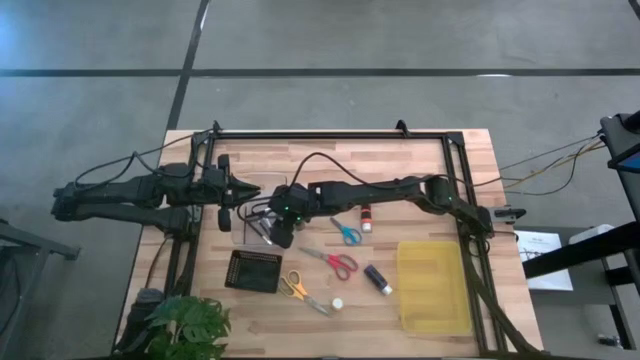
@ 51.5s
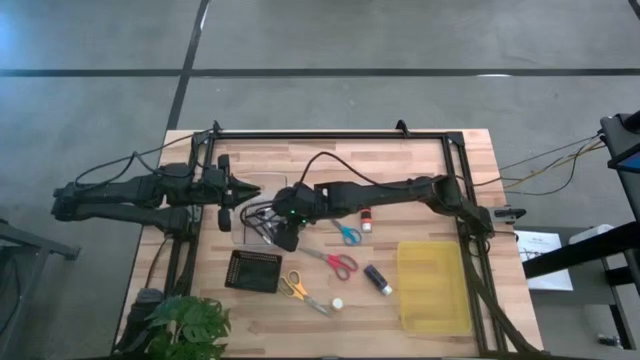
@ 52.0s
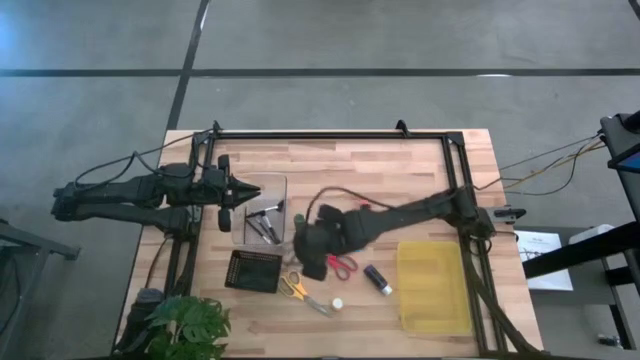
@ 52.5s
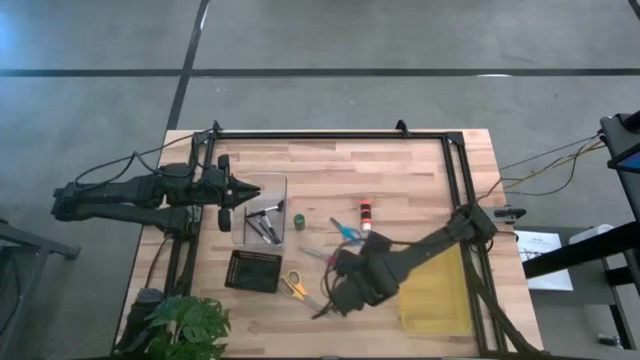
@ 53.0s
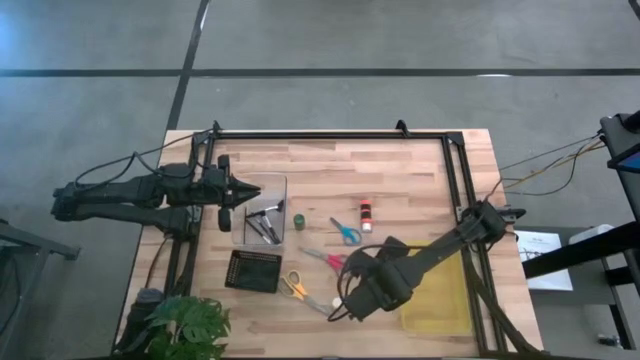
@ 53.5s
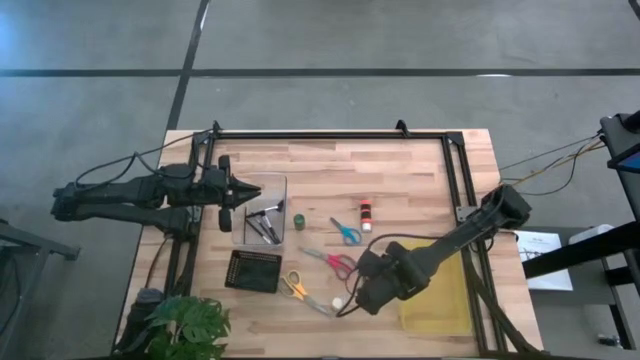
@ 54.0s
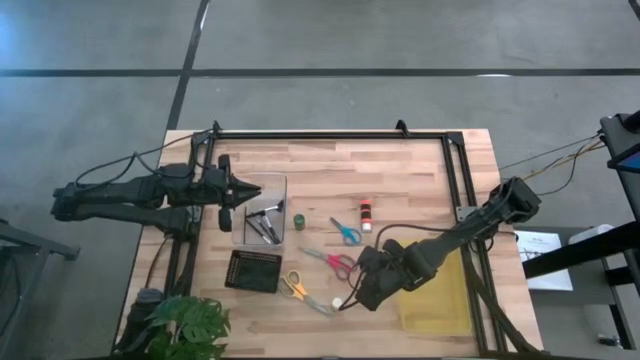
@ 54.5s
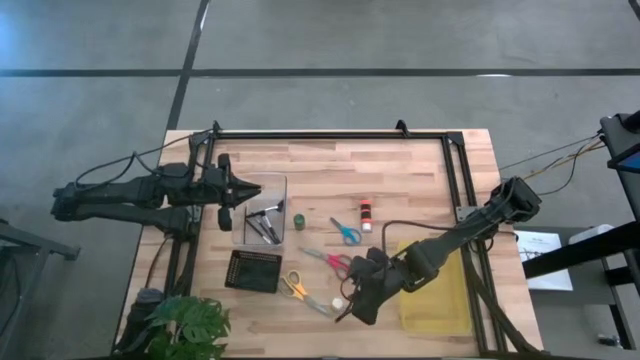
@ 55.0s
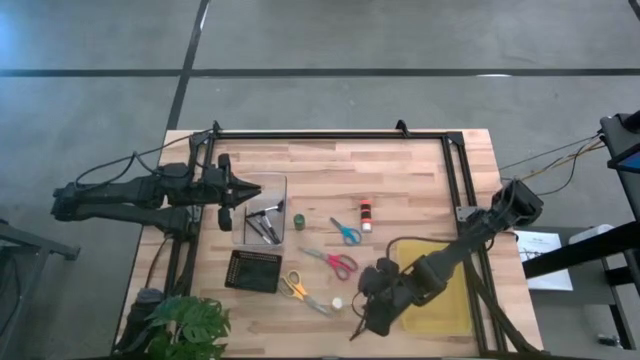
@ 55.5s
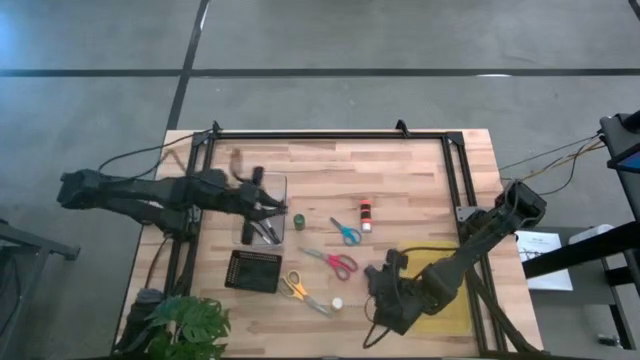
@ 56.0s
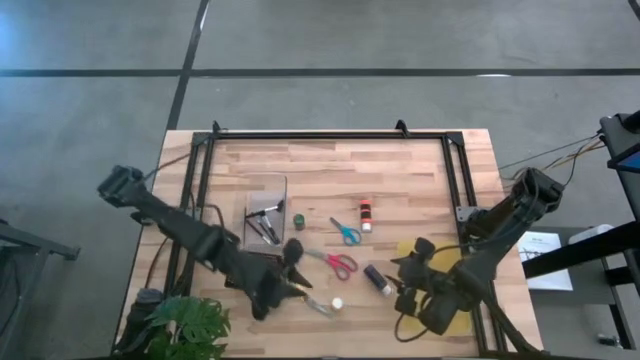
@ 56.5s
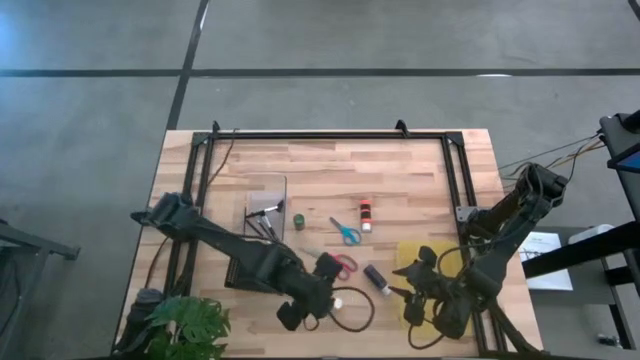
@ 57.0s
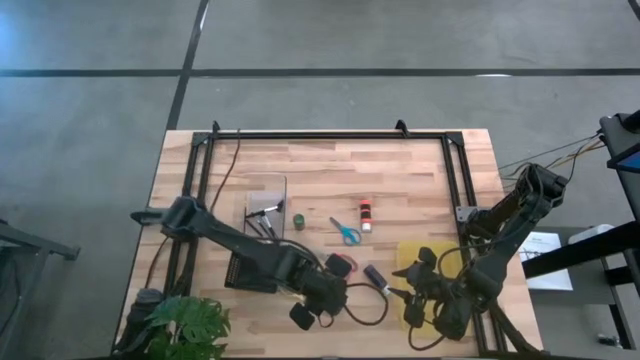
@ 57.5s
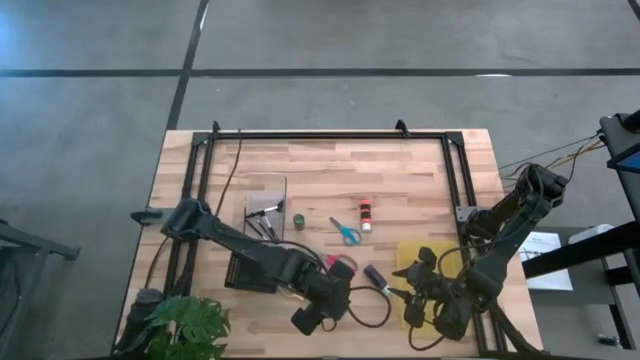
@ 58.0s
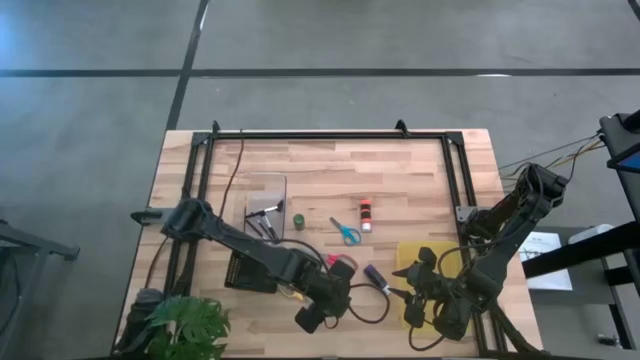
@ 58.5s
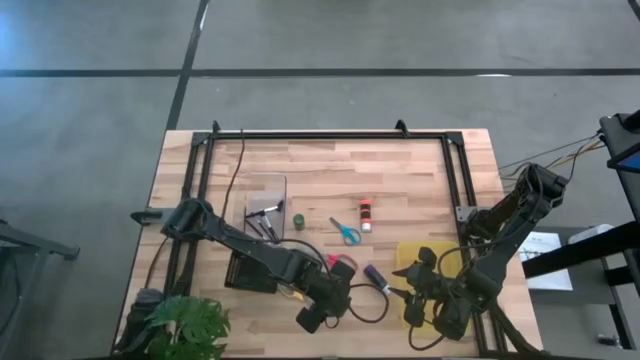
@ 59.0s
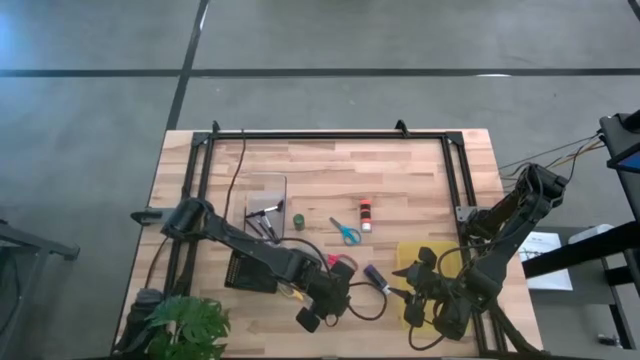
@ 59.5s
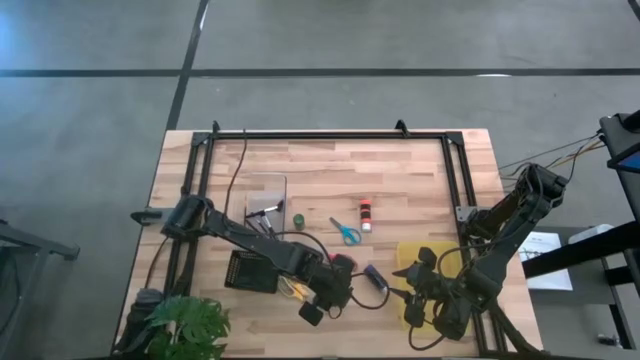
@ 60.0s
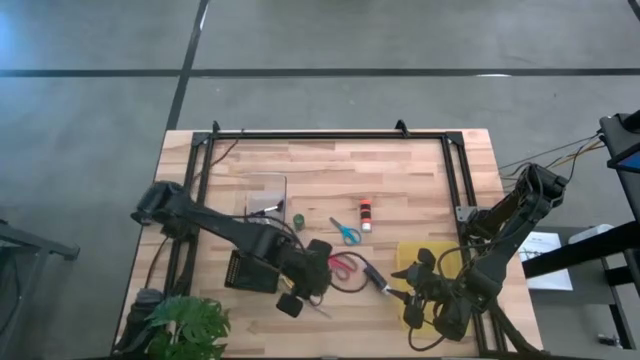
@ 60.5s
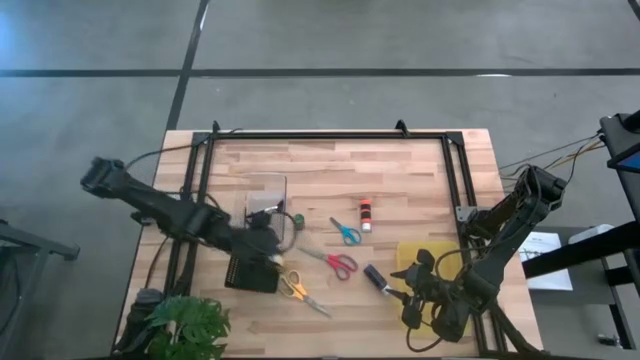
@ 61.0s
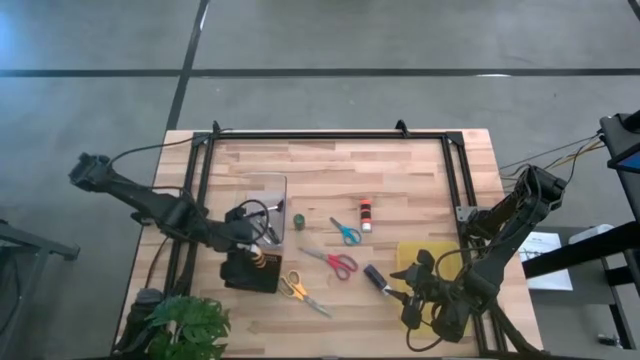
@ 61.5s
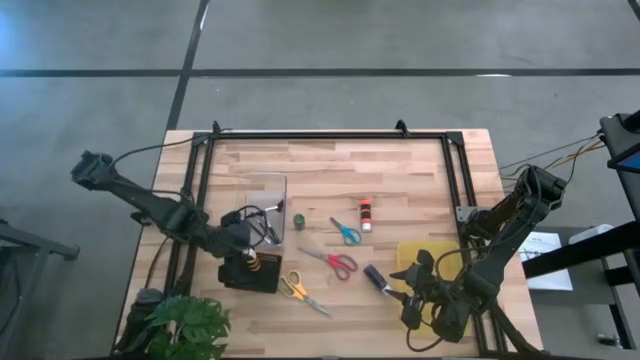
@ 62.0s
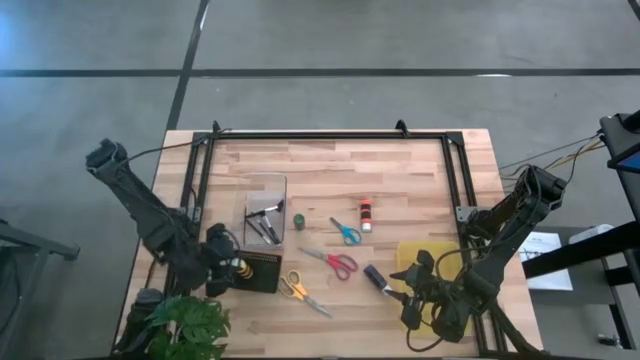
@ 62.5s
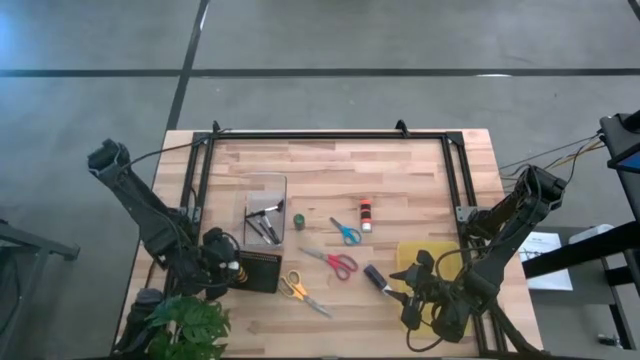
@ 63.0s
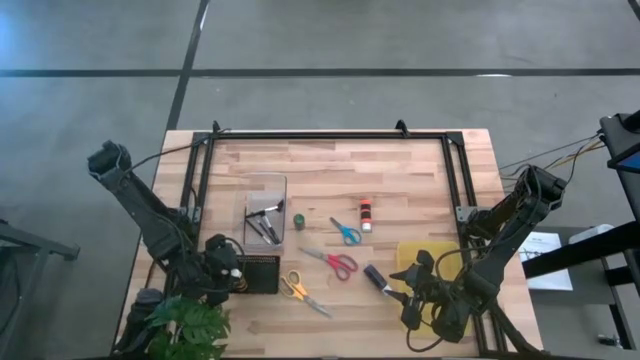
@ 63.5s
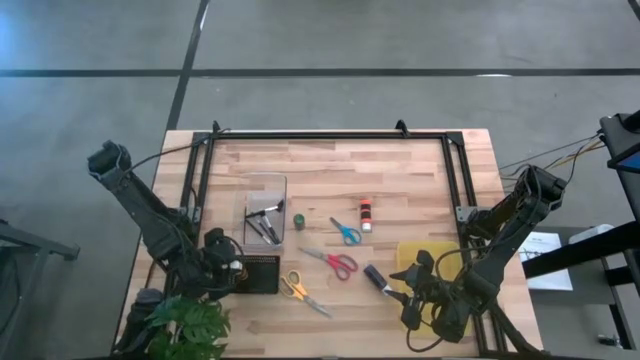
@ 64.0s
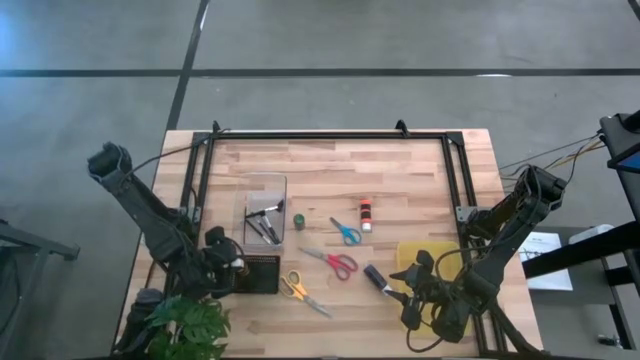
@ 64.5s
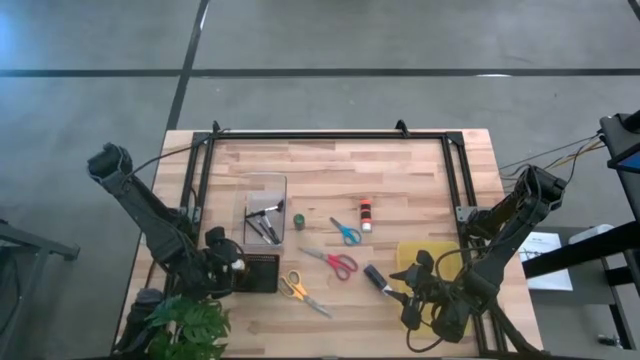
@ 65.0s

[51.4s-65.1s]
Task: Pick & Place Paint Supplies
Put the yellow paint bottle into the black basket

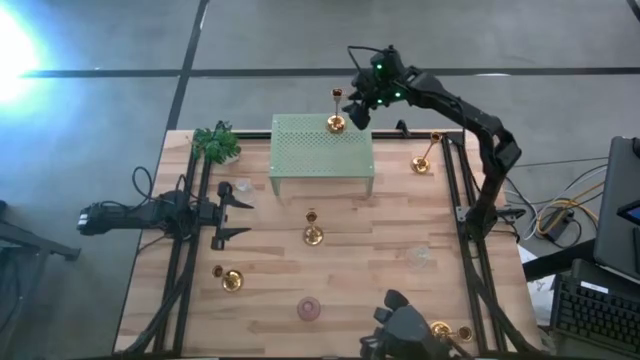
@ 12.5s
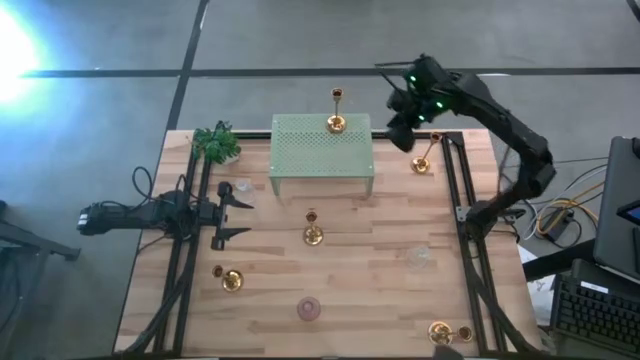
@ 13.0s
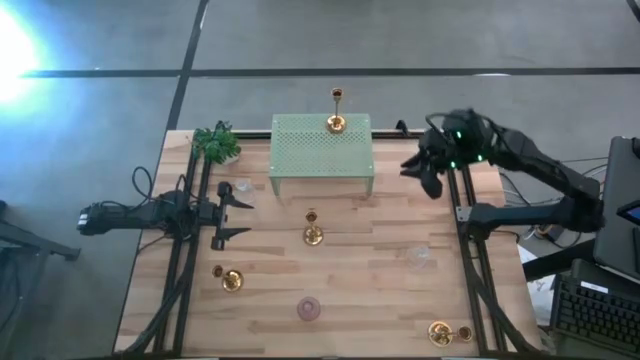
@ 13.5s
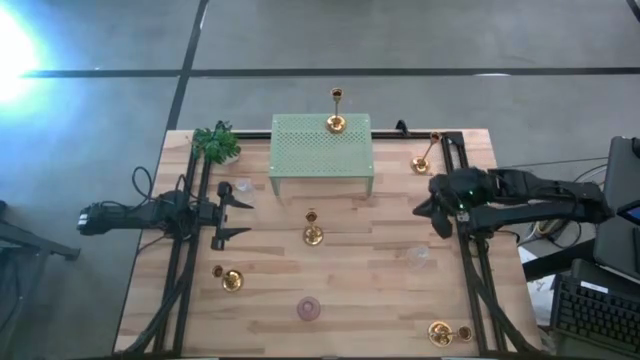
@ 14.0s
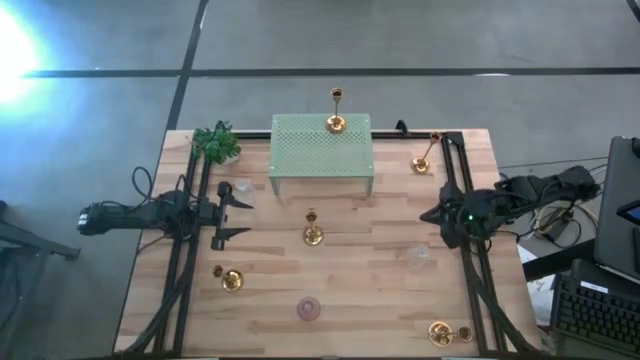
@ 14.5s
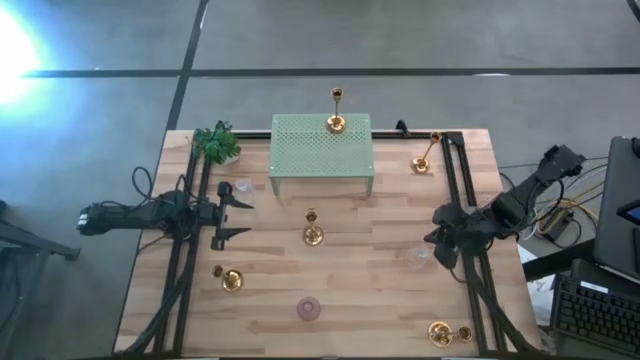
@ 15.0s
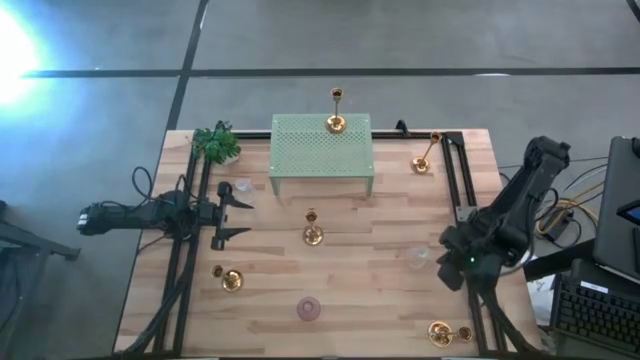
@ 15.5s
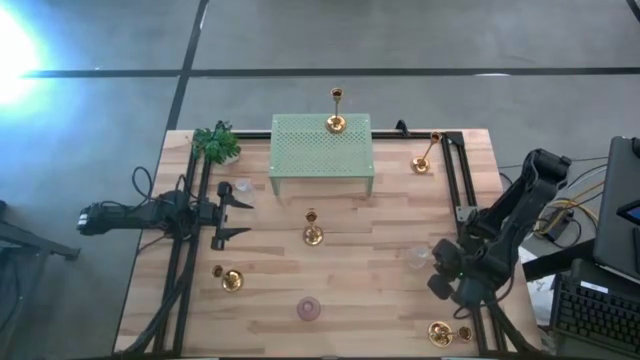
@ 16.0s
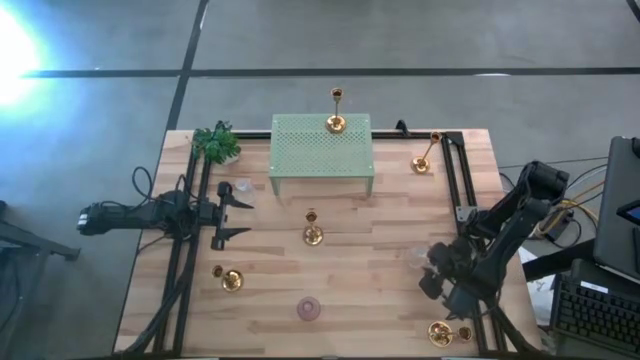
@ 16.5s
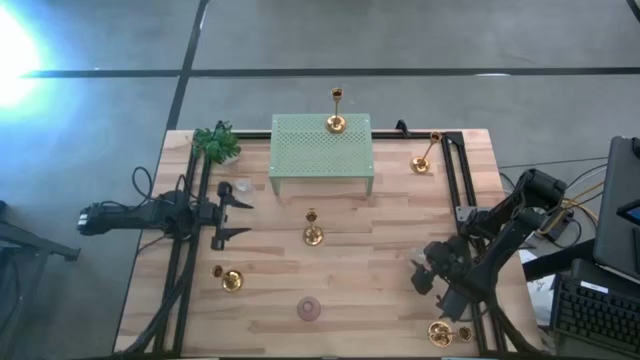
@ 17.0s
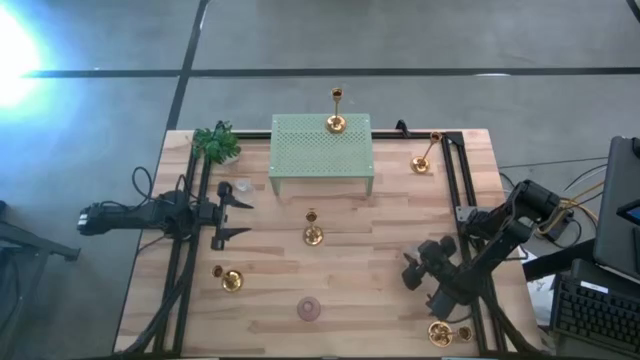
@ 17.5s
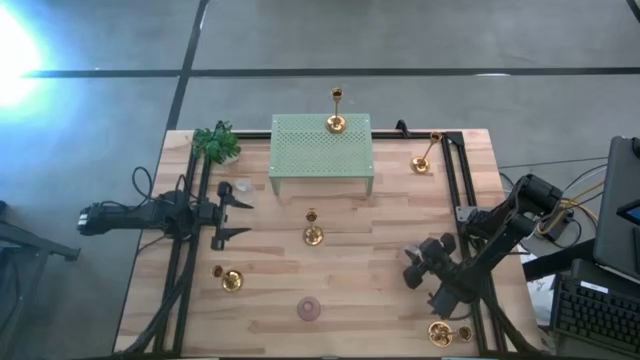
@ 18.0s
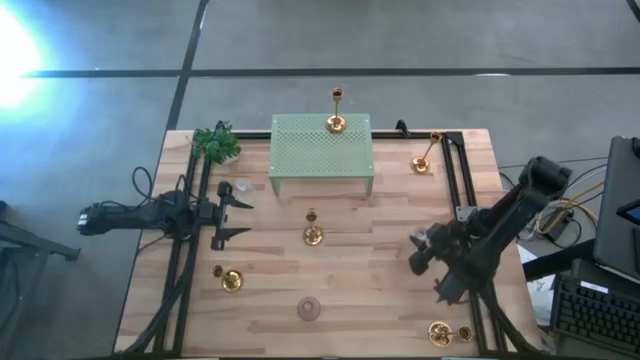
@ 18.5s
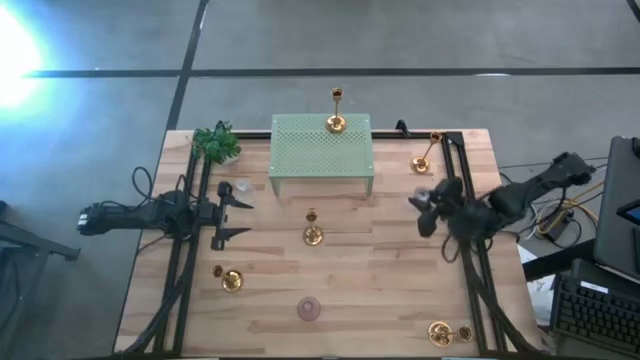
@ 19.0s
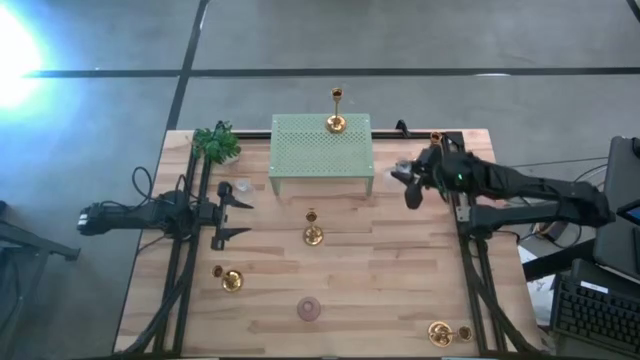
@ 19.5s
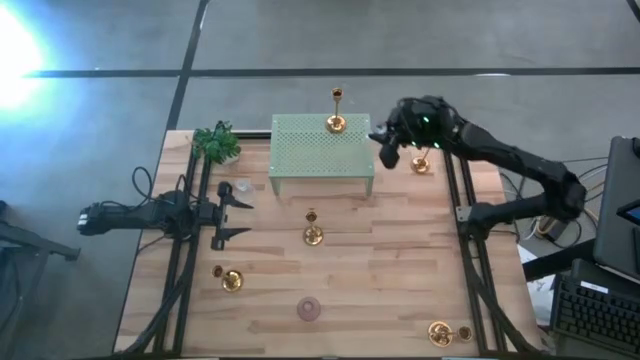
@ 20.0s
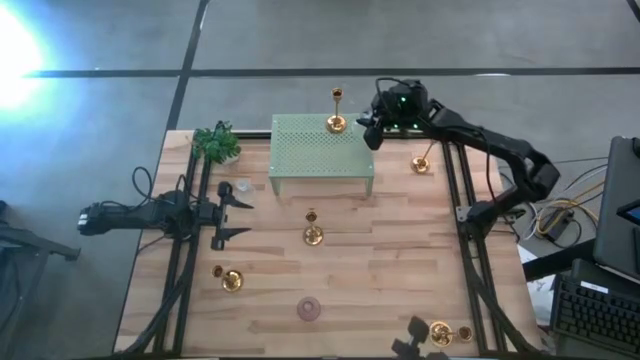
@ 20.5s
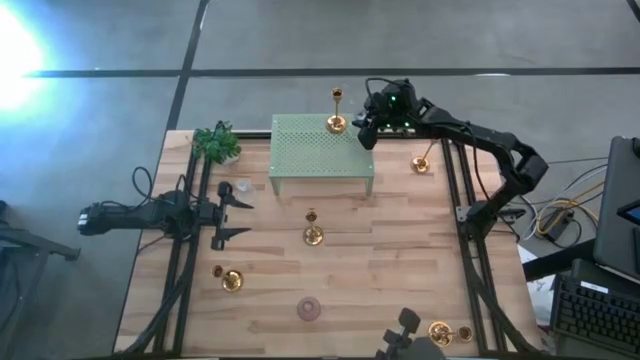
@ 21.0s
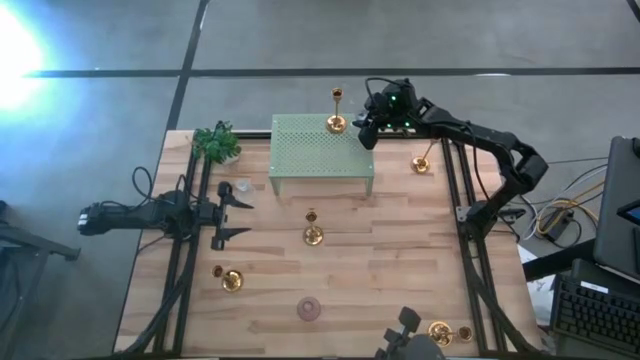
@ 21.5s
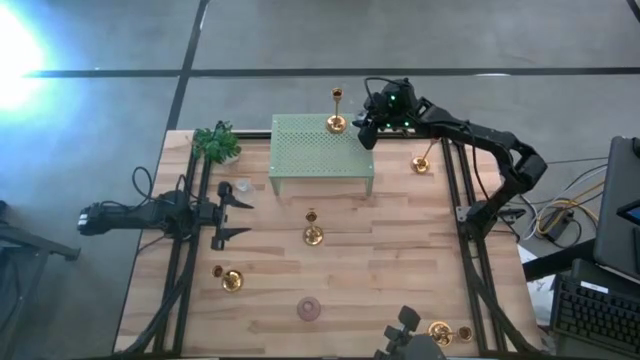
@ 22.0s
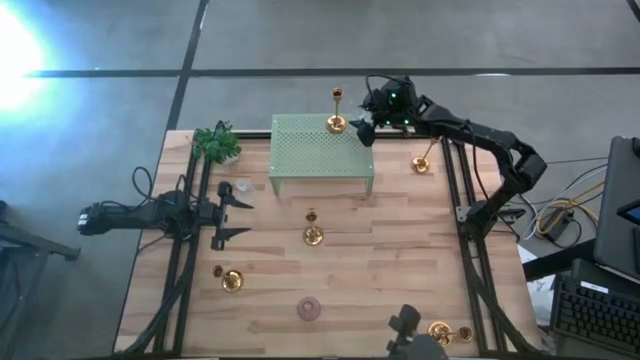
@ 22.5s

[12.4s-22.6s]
Task: Pick & Place candle stick holders
Put the transparent glass candle holder on the shelf
